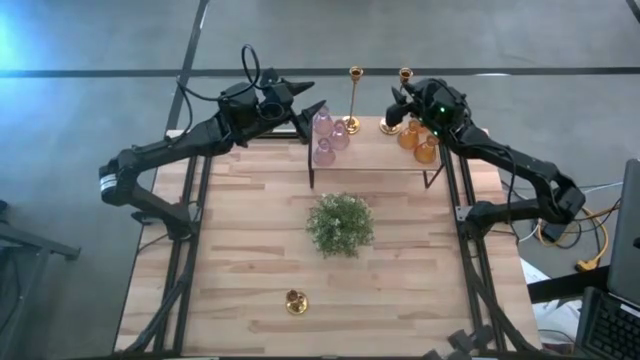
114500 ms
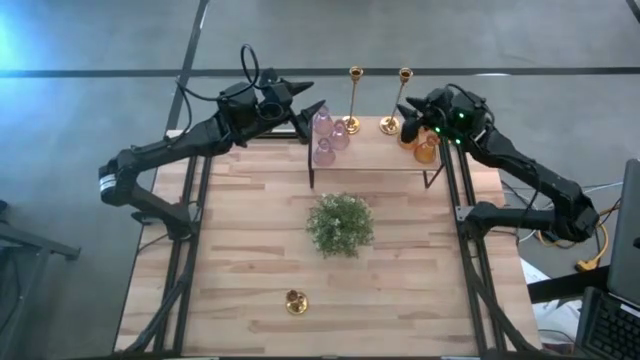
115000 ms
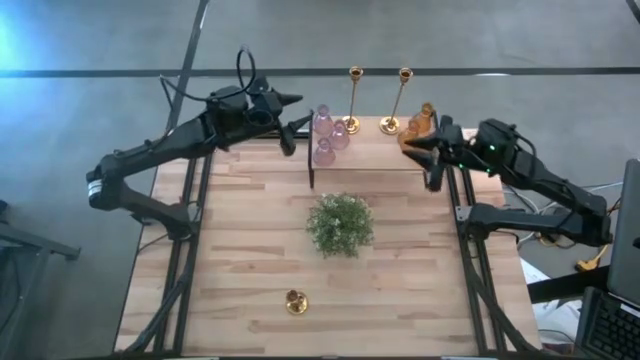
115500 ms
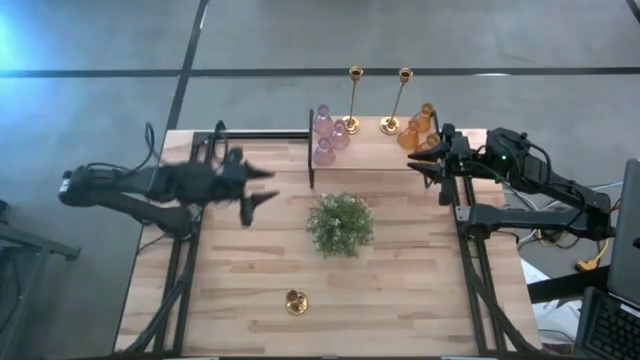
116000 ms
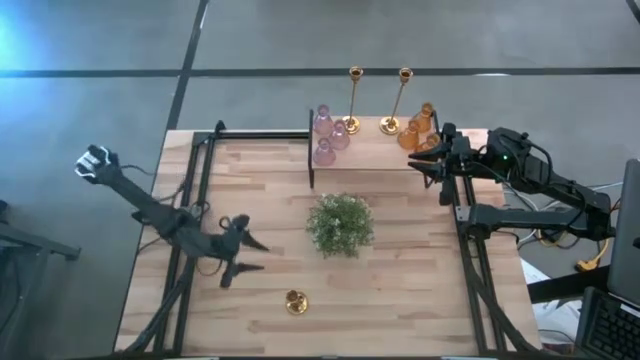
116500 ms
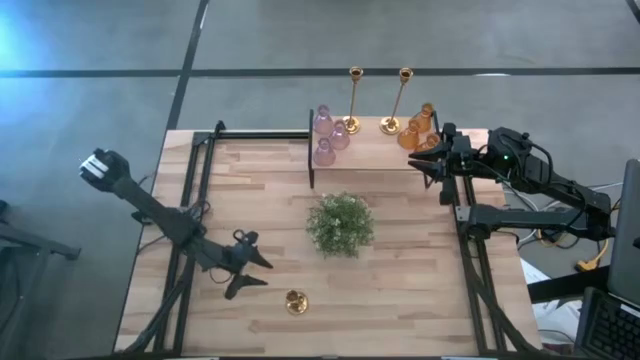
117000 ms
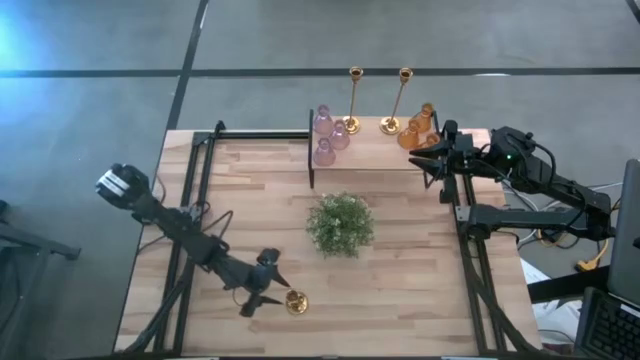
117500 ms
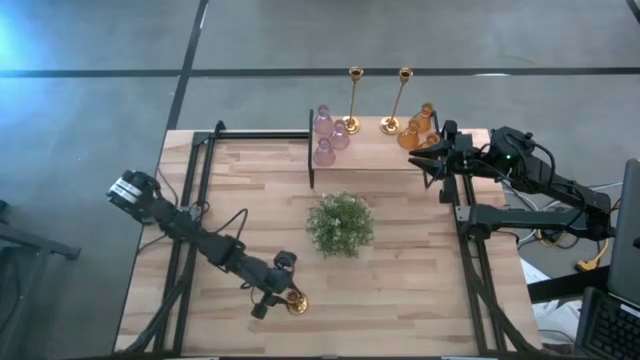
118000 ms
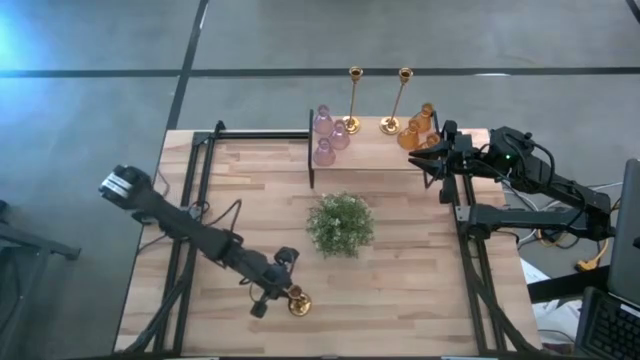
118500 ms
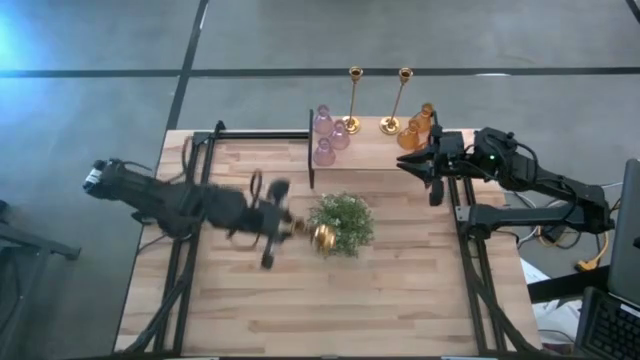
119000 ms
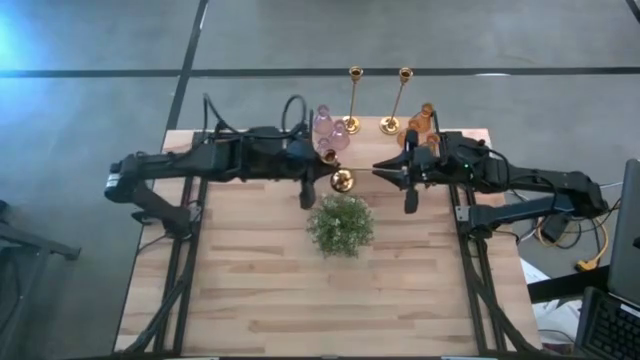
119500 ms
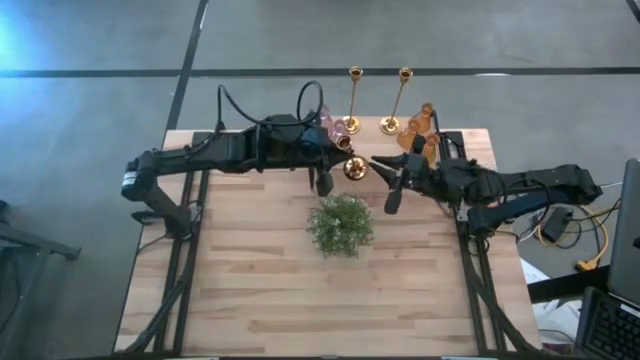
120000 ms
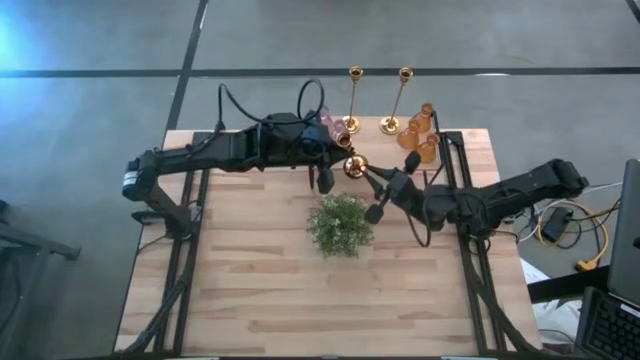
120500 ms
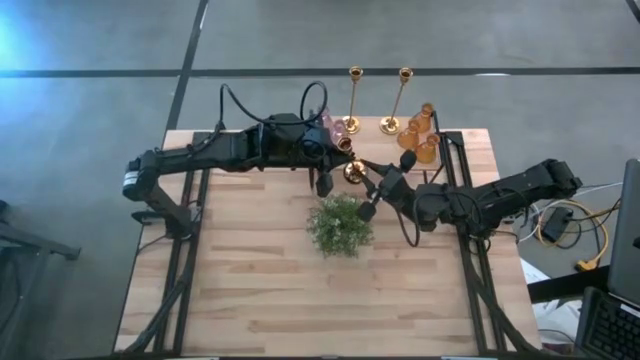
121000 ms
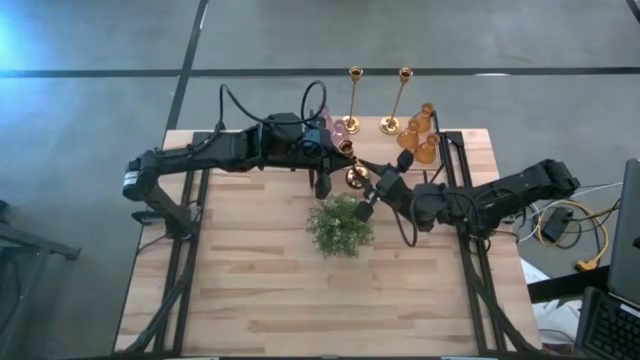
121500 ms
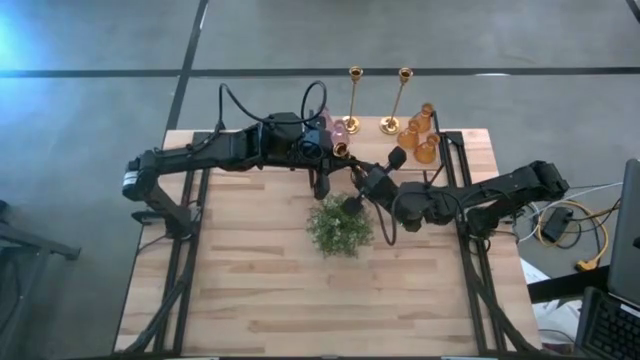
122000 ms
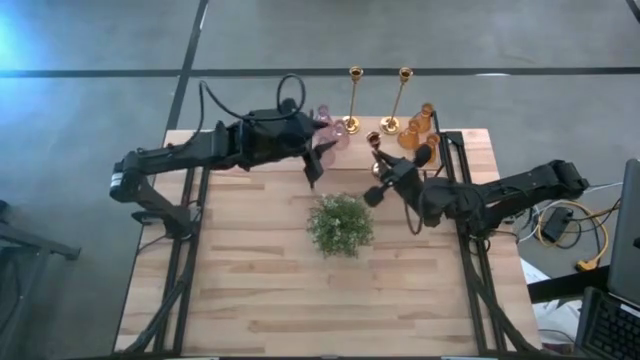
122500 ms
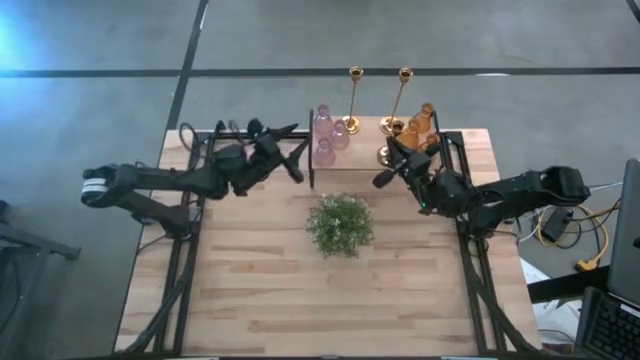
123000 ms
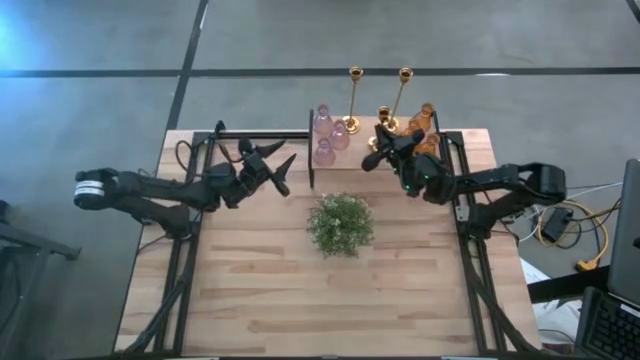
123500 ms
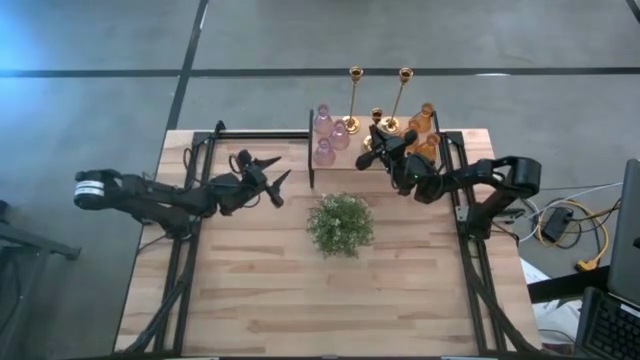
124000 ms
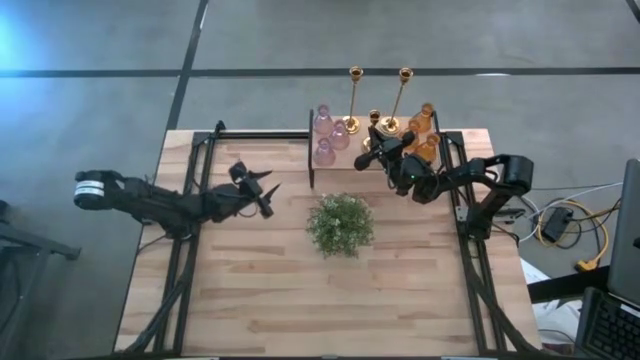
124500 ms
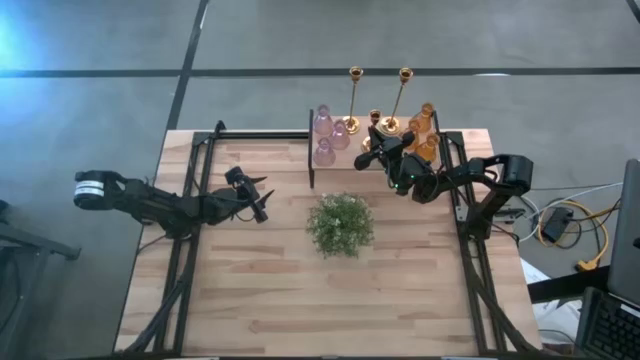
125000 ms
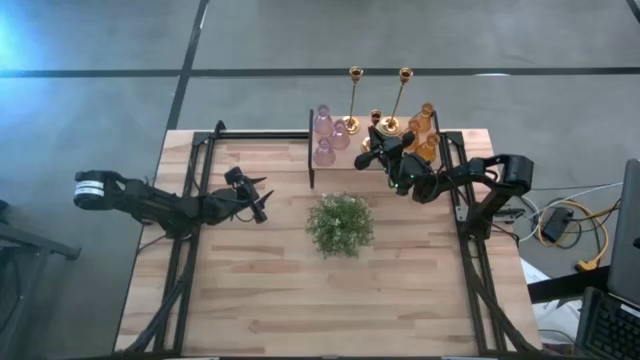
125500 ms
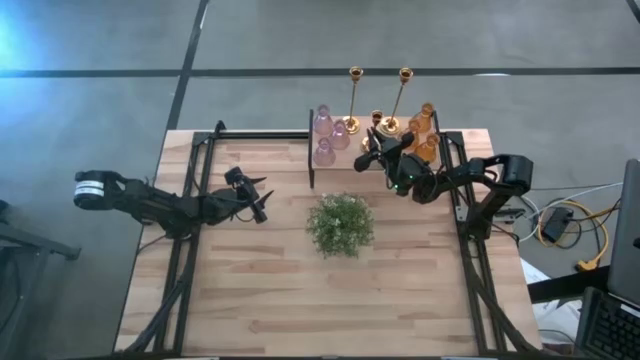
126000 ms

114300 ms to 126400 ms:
Task: Pick & Place candle stick holders
Put the small golden candle holder on the shelf

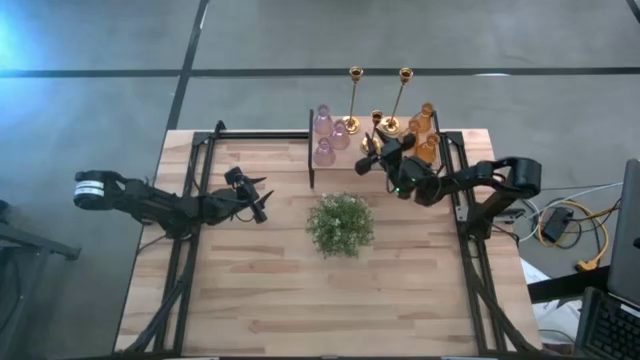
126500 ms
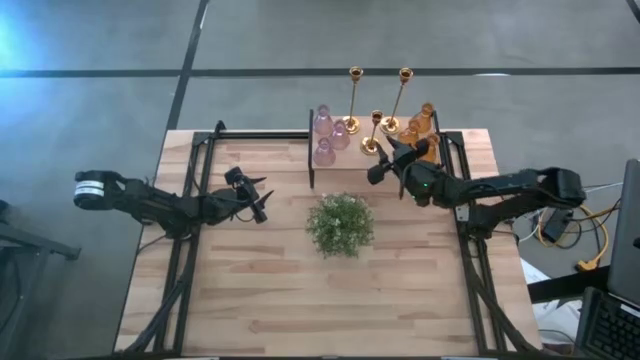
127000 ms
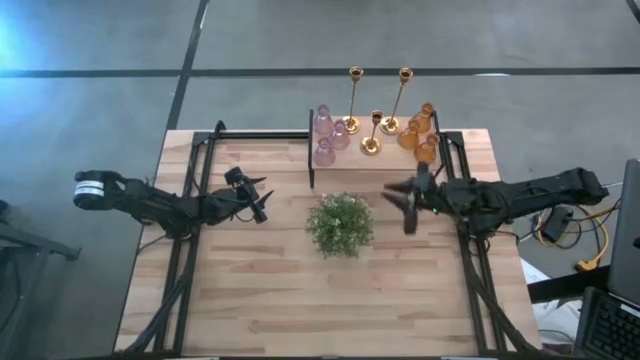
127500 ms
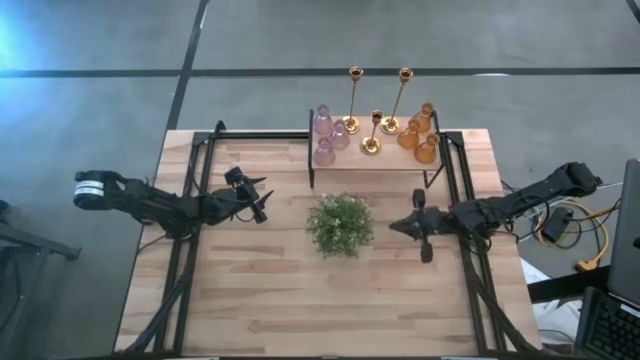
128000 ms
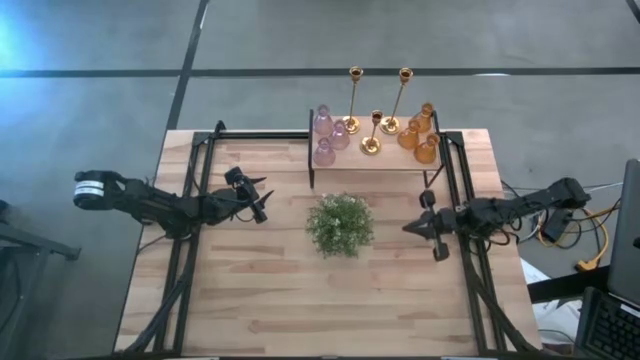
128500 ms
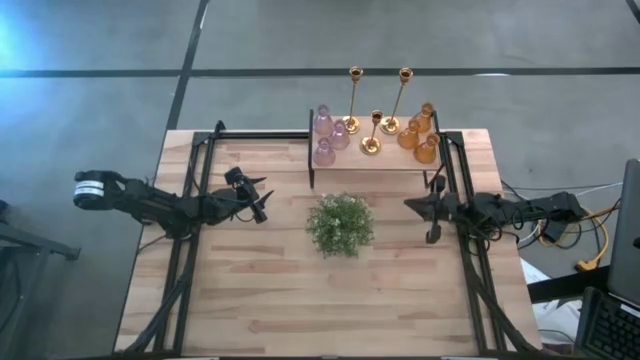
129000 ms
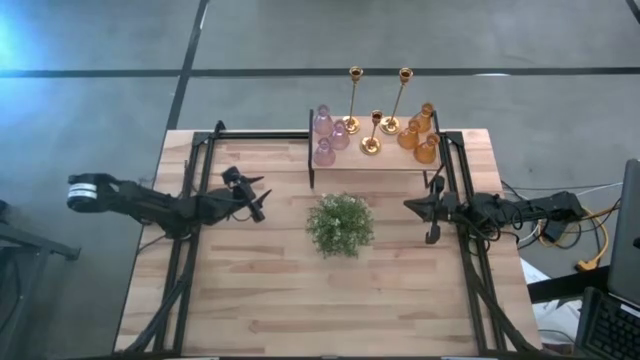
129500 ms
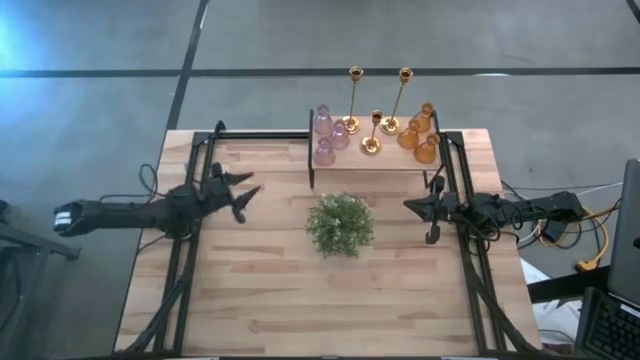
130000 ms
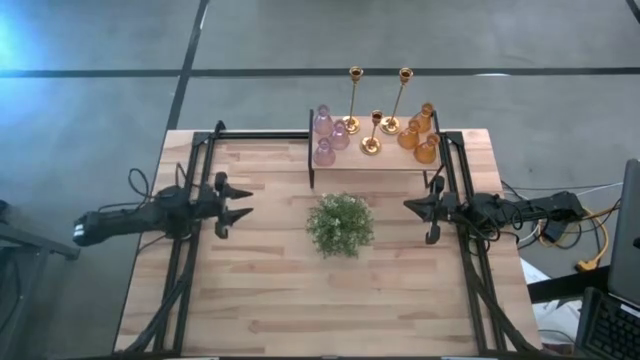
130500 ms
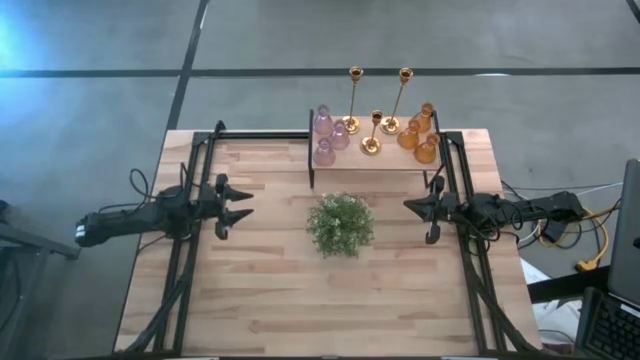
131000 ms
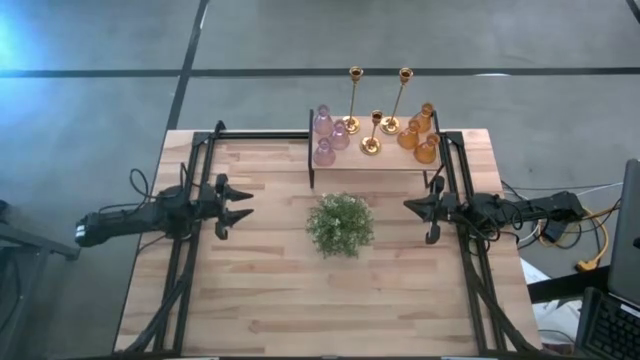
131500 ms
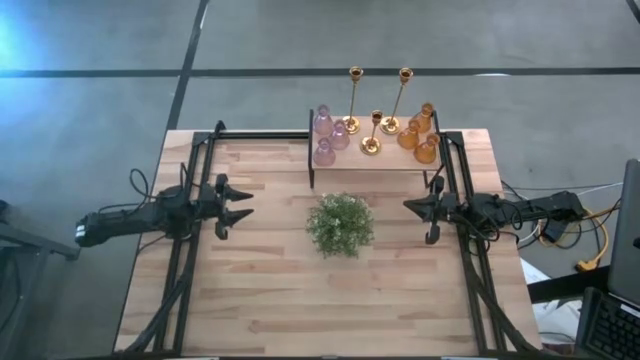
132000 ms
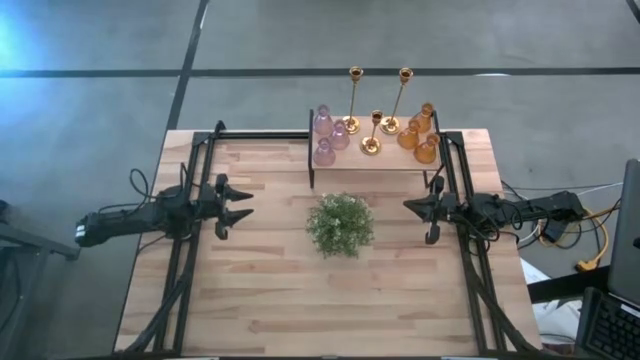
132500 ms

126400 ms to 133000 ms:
Return to Home Position

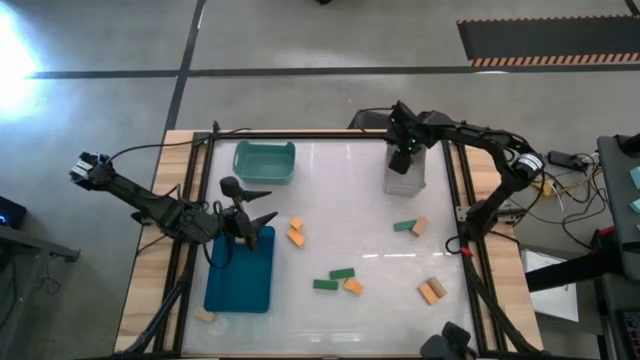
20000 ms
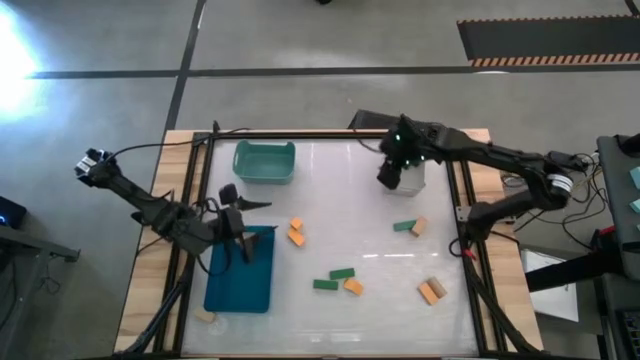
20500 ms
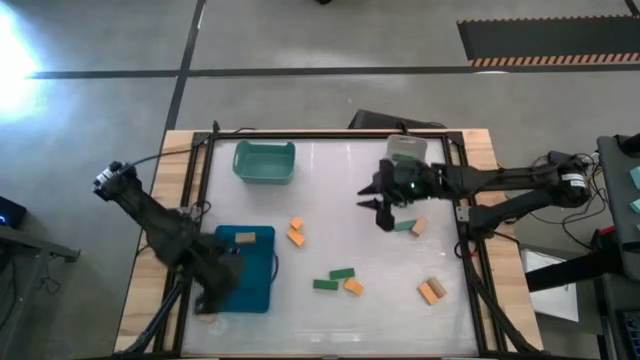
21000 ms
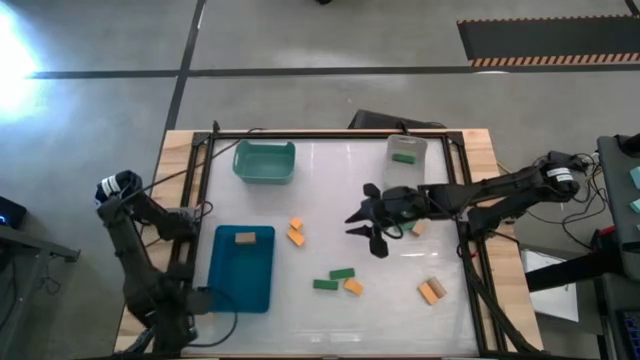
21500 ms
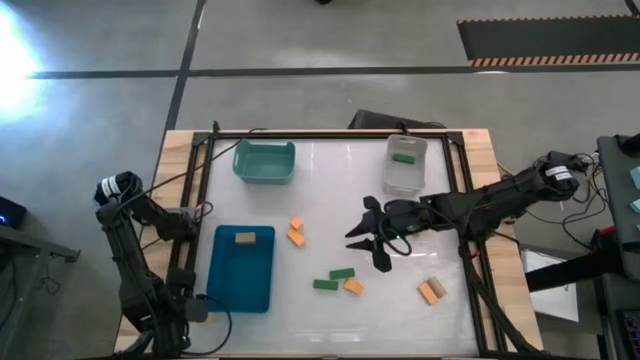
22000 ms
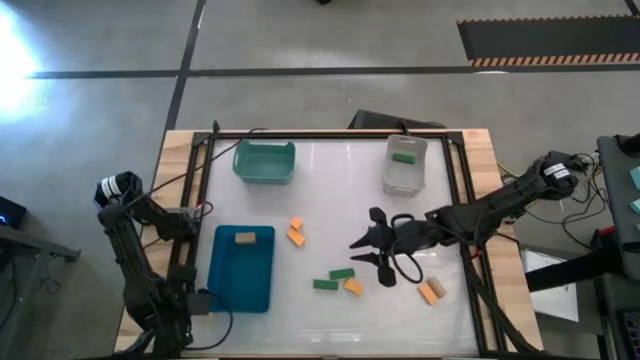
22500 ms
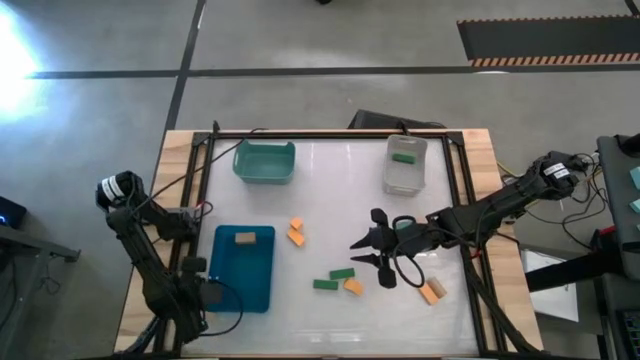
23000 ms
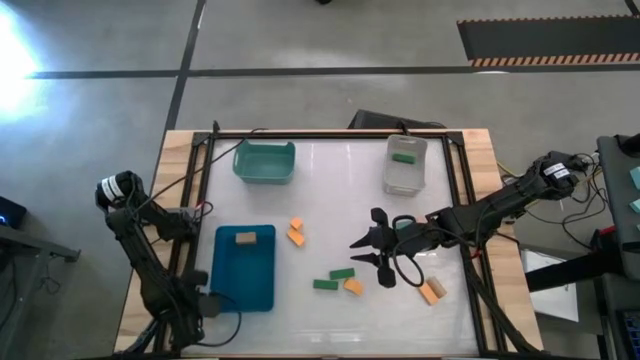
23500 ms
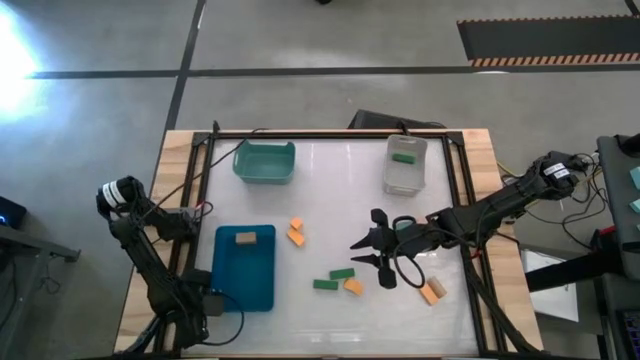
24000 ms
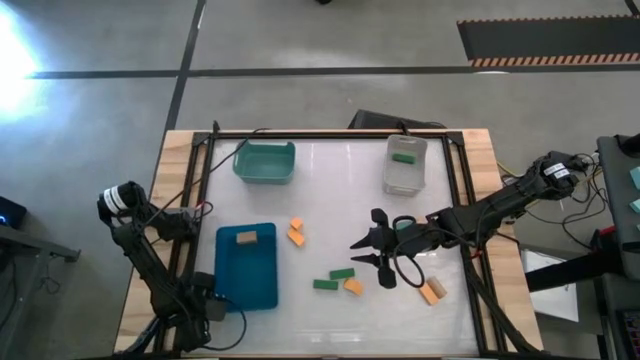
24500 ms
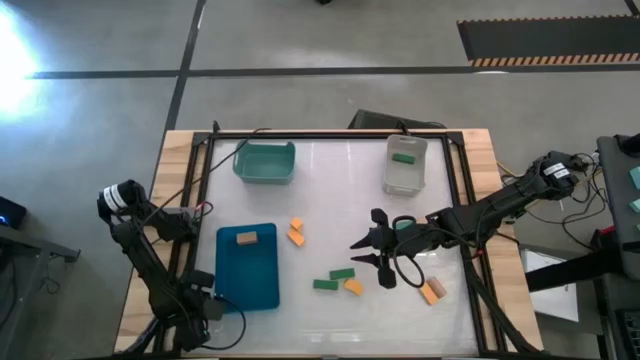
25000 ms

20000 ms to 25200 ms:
Task: Sort & place blocks by color
Put the light brown block into the blue bin
